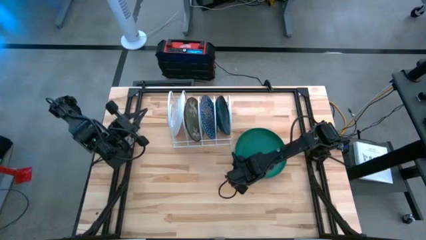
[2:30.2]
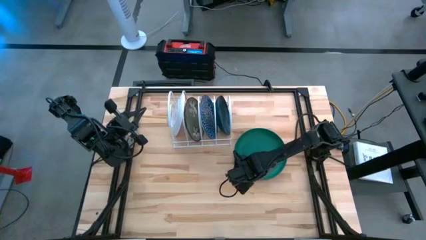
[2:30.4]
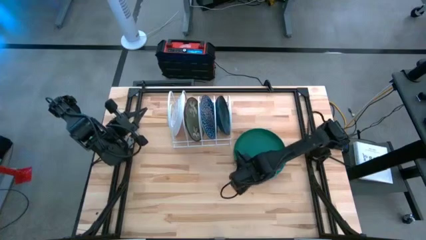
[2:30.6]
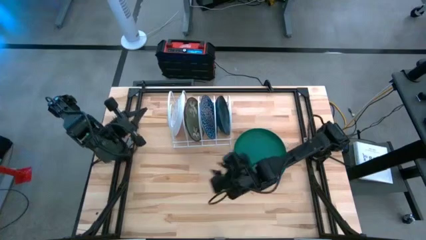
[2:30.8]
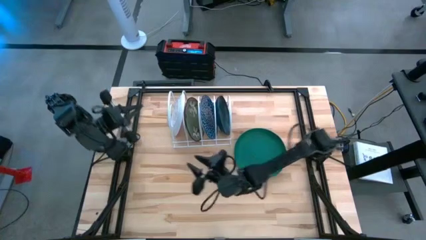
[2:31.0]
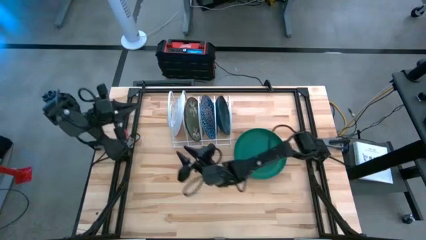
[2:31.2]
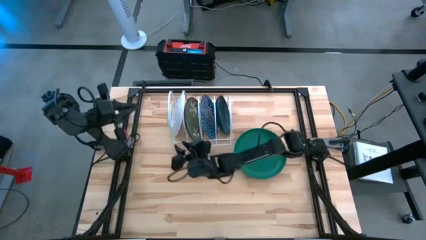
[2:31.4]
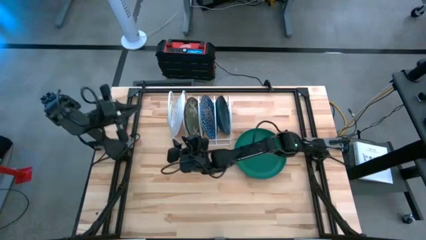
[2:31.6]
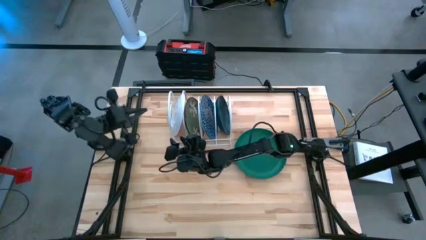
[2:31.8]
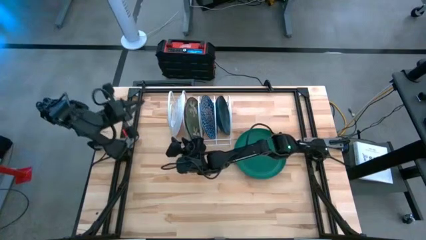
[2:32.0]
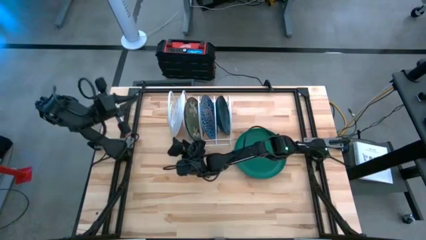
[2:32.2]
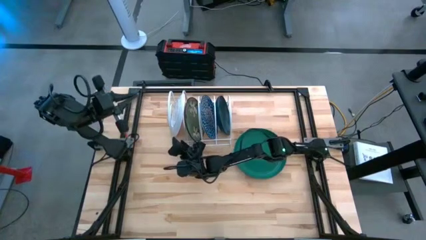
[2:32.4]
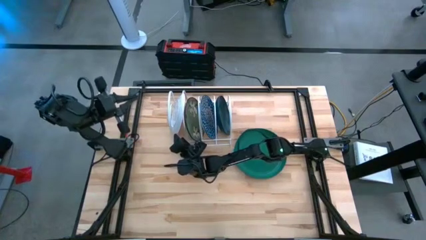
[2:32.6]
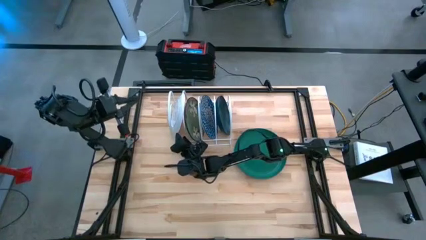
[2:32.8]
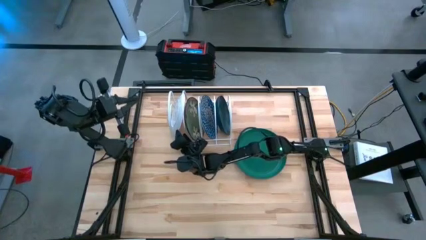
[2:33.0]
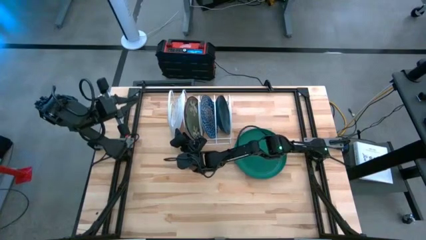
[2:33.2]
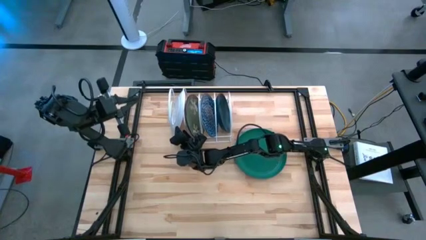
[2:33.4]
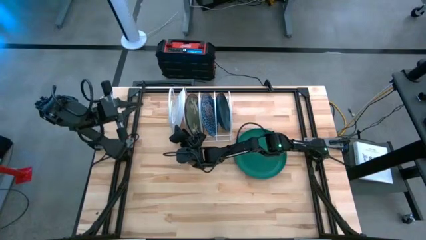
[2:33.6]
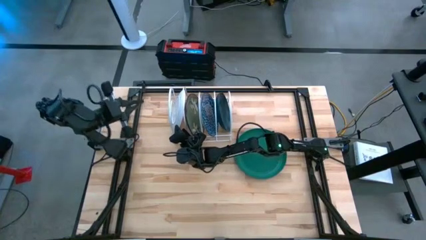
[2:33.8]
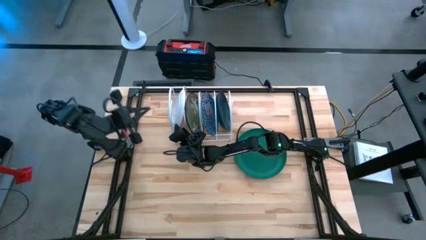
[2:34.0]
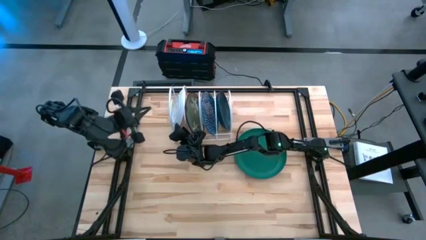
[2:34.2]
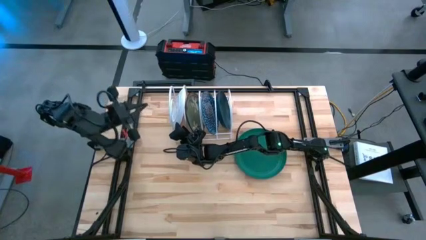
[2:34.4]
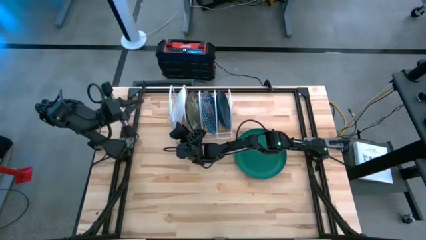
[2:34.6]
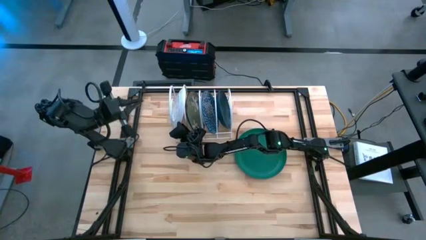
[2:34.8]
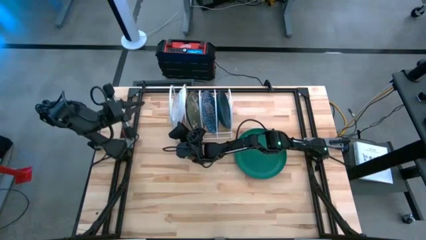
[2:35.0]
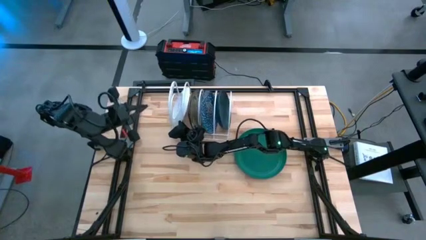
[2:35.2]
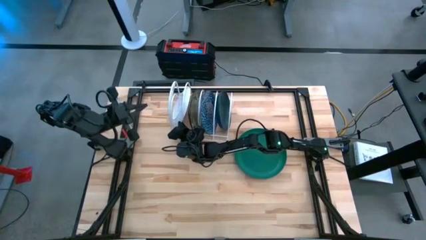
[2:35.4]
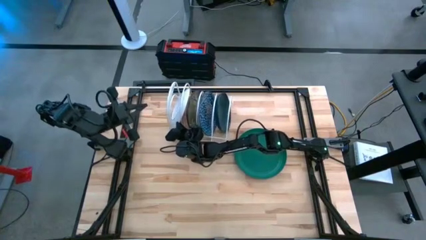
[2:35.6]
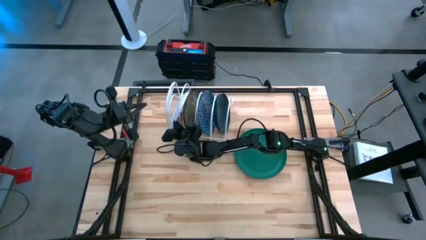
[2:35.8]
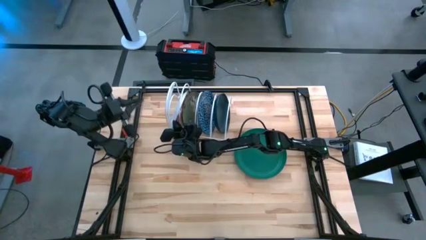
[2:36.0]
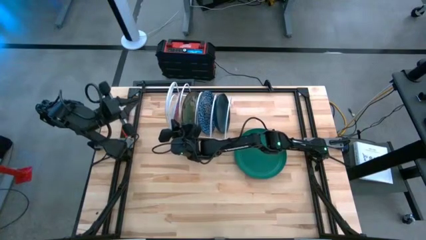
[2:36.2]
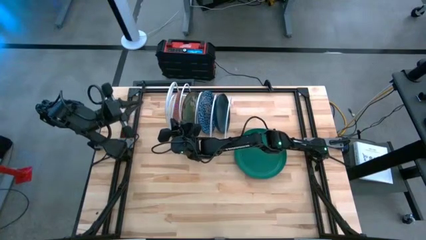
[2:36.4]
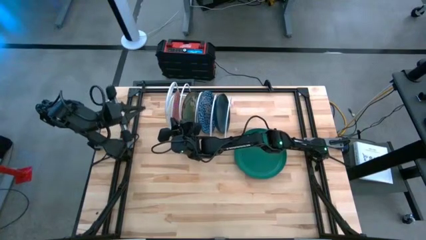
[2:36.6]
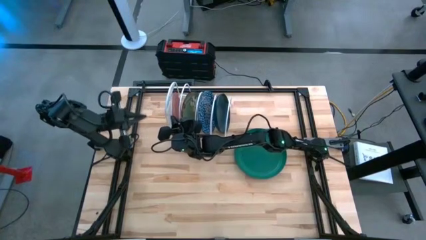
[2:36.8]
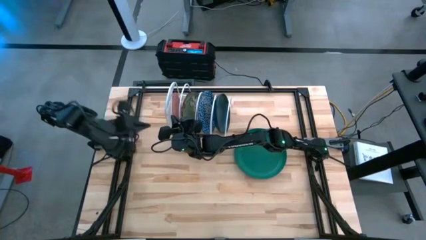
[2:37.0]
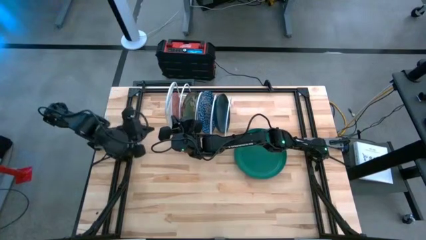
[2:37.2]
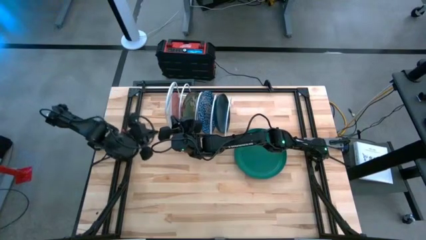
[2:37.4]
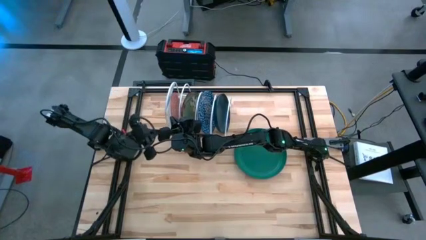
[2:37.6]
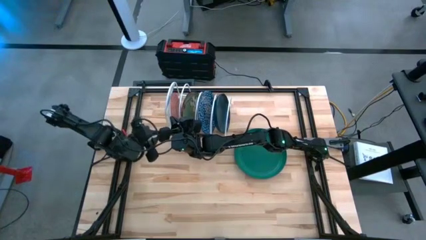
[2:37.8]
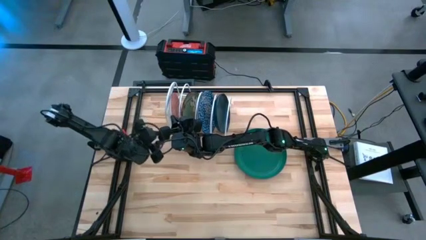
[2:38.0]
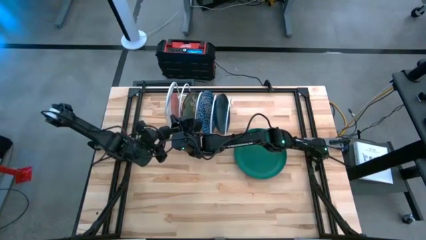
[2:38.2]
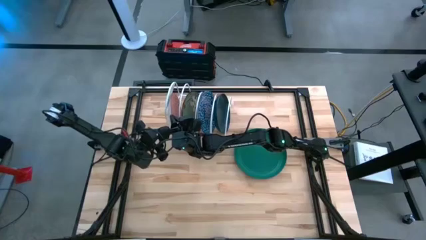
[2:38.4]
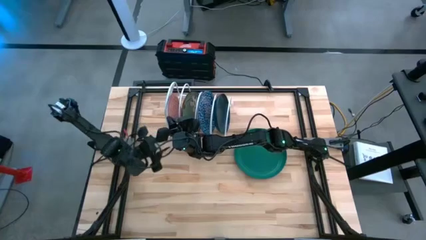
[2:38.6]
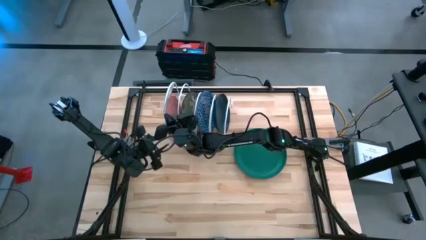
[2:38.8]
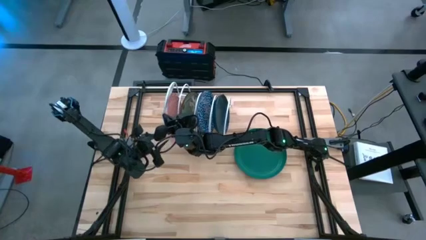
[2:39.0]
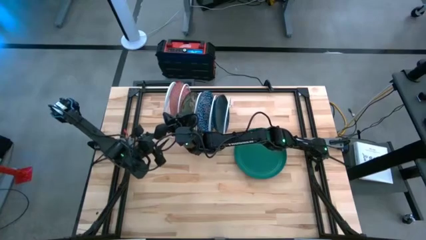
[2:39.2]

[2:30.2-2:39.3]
Task: Sort dishes
Remove the orange patterned plate from the dish rack

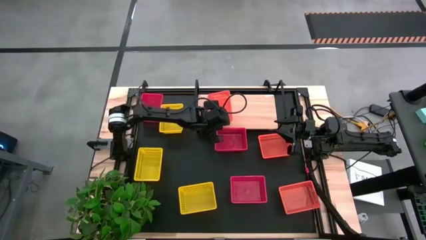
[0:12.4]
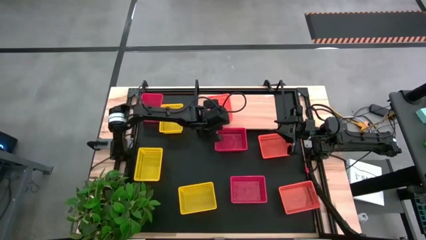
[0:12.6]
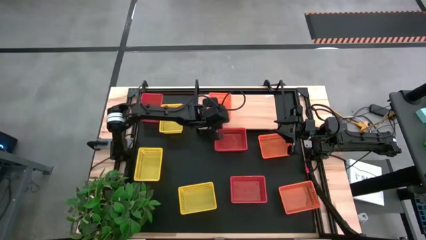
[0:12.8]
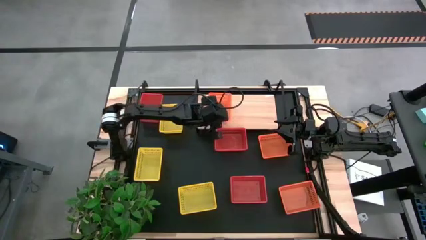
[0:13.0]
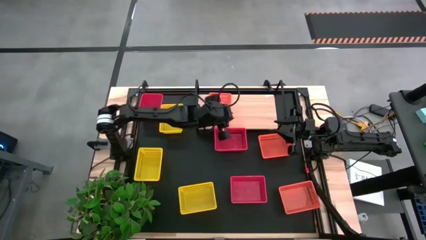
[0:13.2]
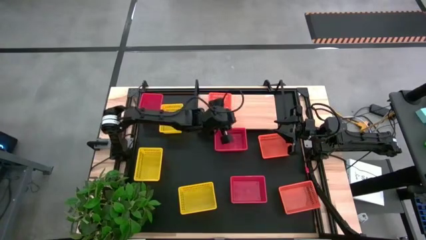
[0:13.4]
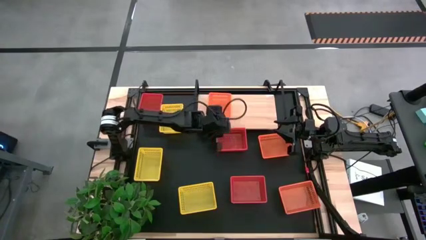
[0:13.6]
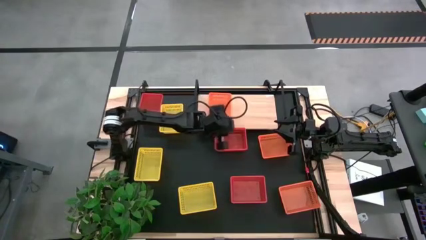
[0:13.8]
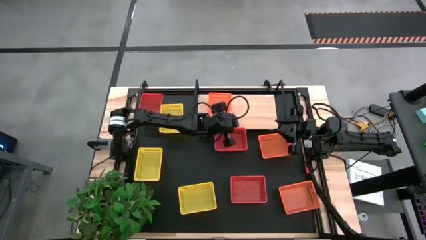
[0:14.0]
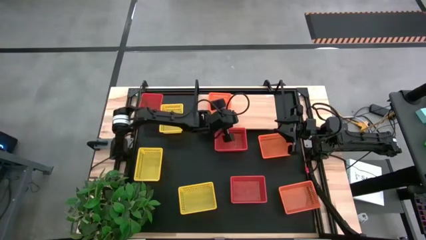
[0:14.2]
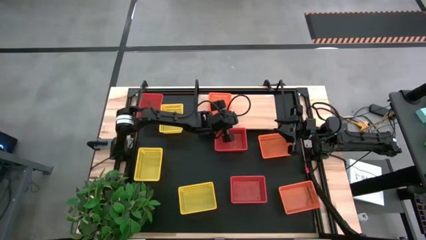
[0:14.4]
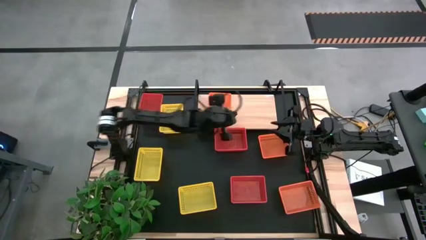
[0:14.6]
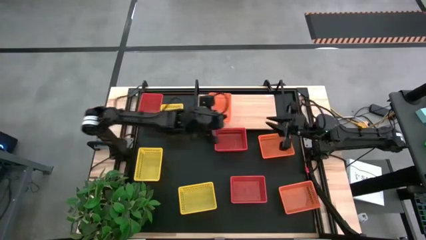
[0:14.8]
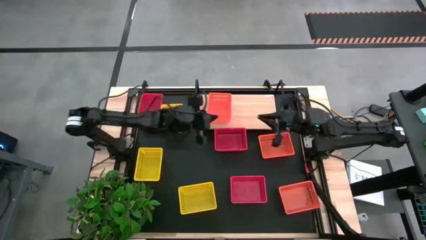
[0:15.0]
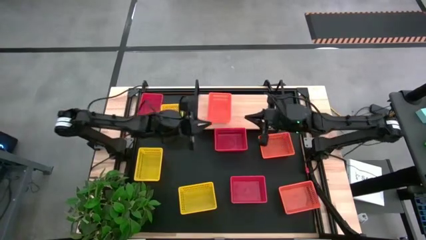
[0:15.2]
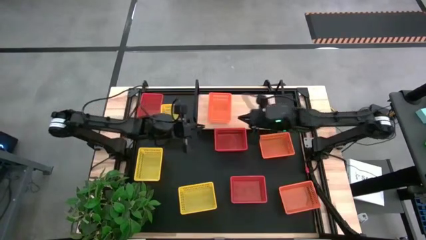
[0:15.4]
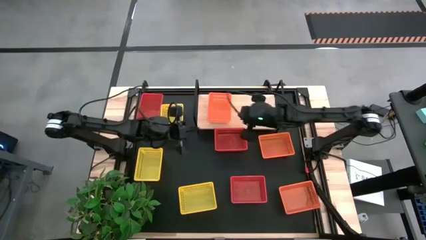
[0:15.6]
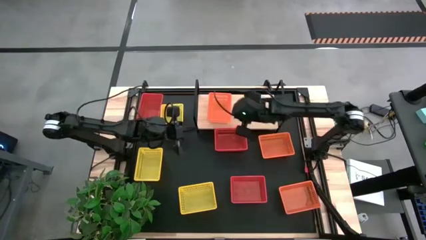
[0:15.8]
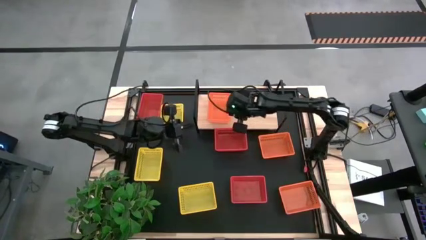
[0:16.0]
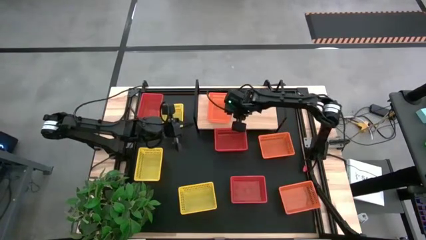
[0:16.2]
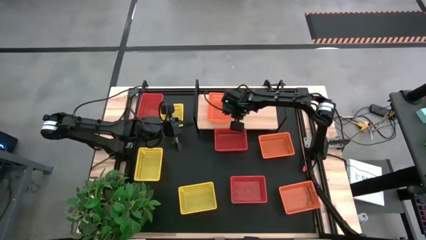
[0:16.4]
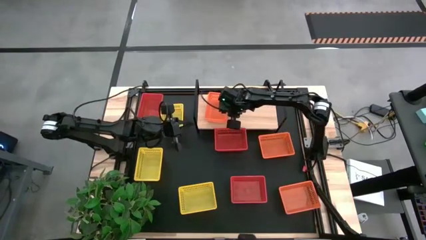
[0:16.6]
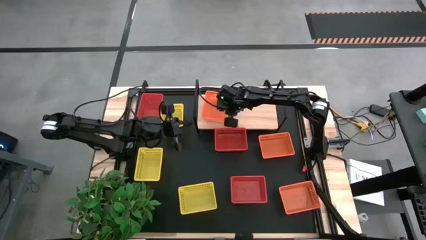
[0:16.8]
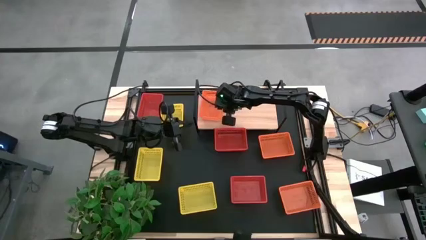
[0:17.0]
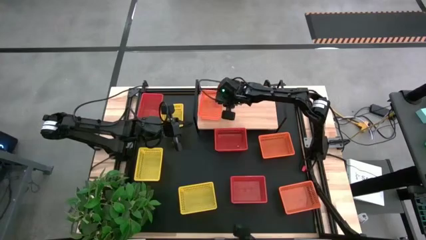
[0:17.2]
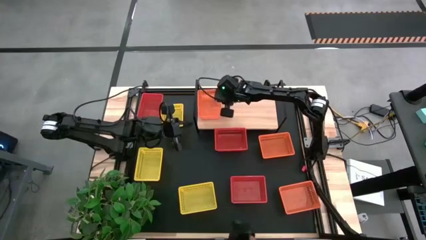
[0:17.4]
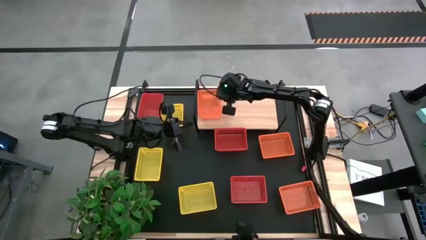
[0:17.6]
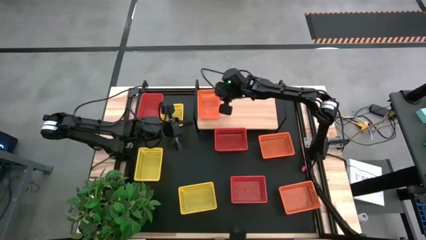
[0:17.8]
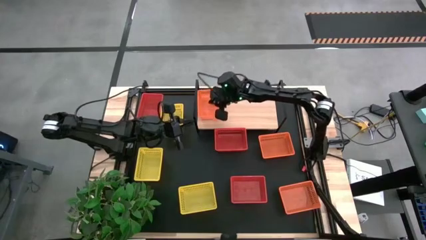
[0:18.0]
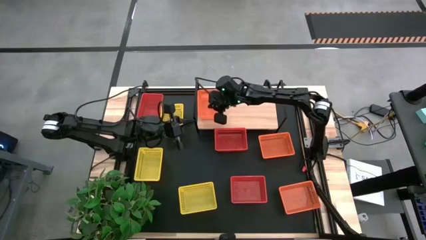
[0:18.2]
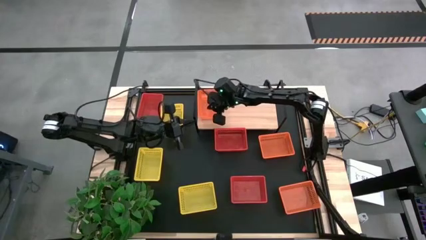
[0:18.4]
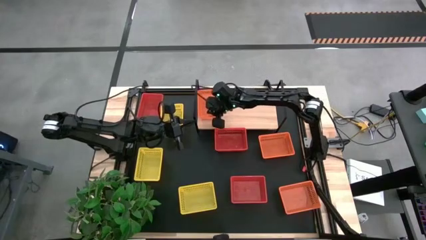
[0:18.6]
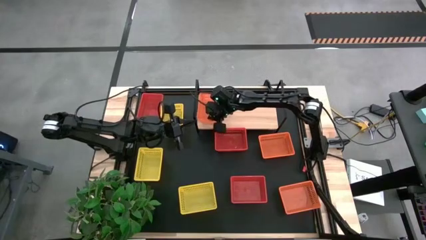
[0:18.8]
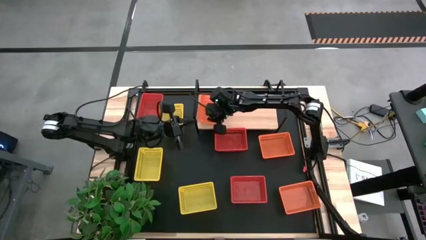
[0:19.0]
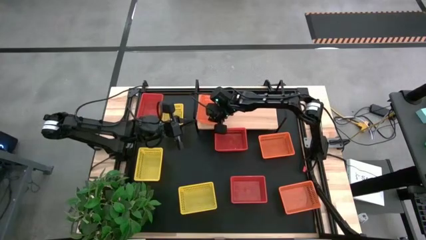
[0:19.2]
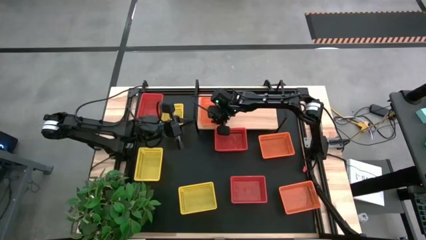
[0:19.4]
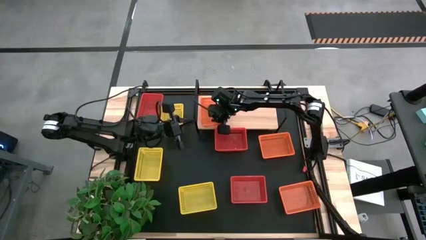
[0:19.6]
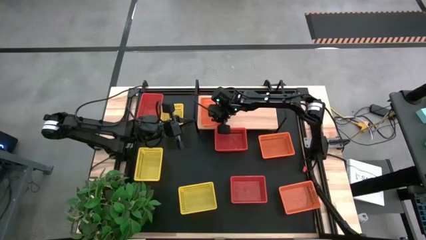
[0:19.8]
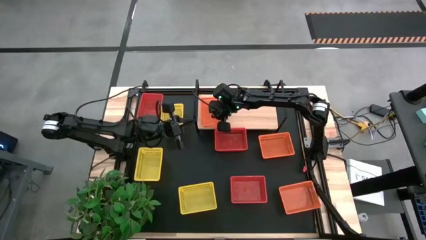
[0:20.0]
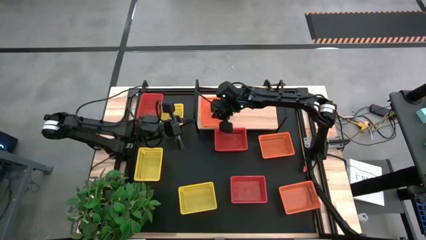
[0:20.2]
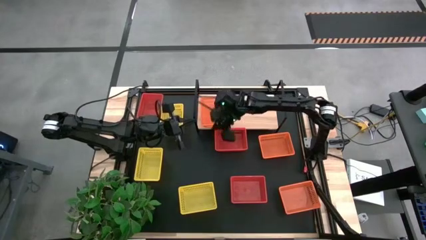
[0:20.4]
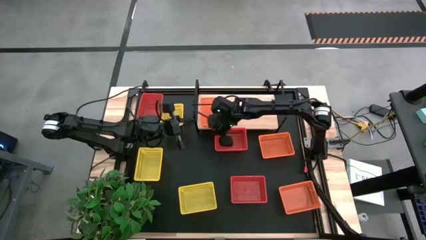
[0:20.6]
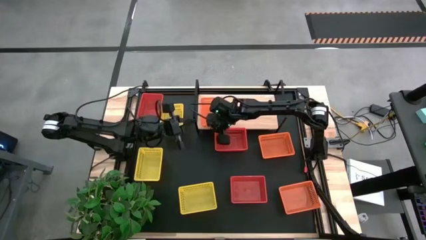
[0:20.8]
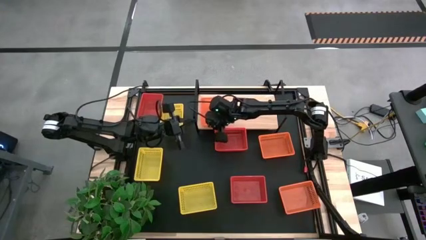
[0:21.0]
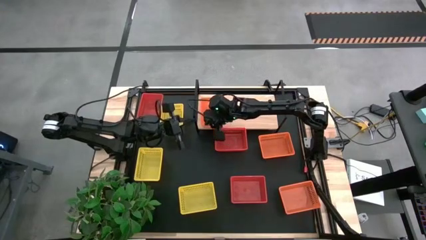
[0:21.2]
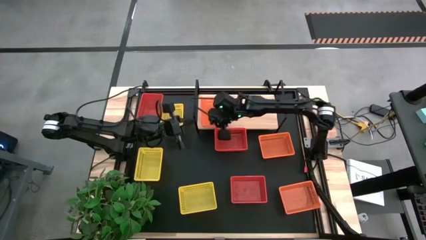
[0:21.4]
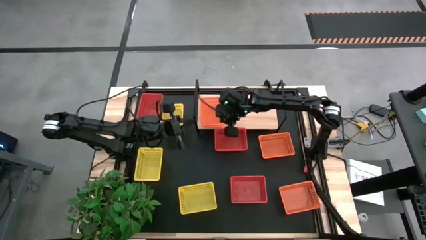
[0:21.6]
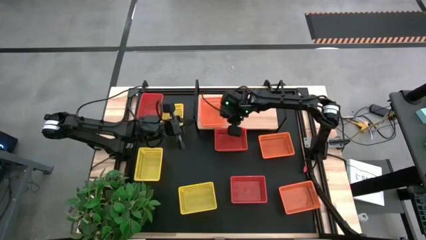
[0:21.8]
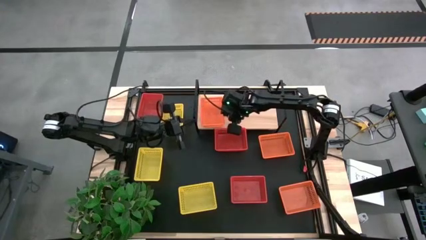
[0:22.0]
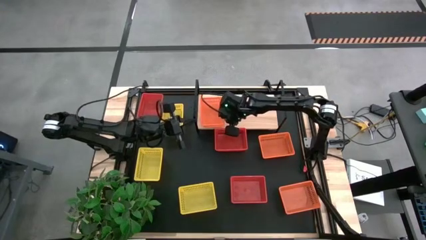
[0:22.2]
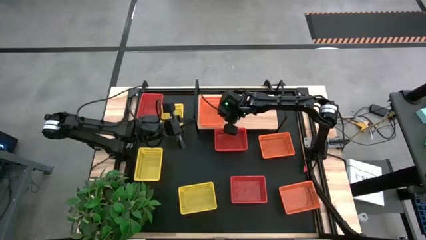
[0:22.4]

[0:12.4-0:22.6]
Task: Stack baskets on shelf by color
Put the top left orange basket on the shelf
